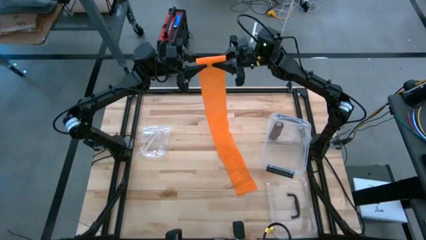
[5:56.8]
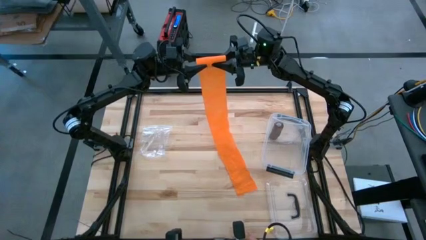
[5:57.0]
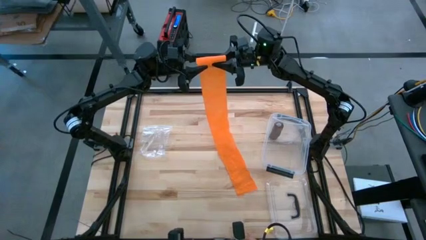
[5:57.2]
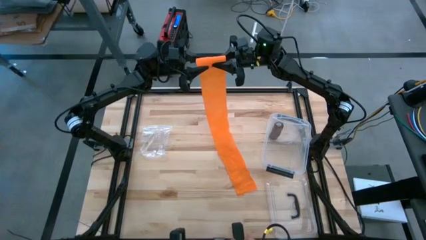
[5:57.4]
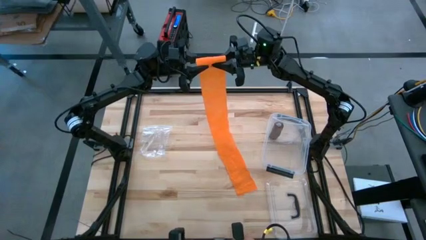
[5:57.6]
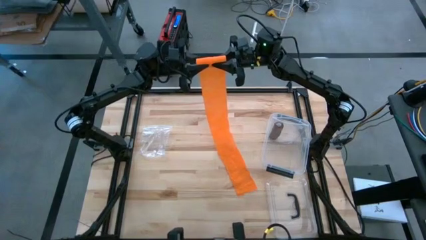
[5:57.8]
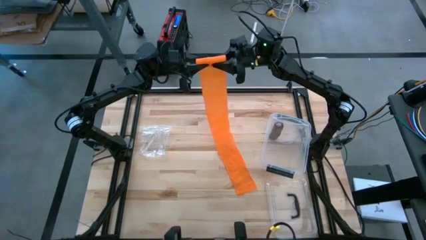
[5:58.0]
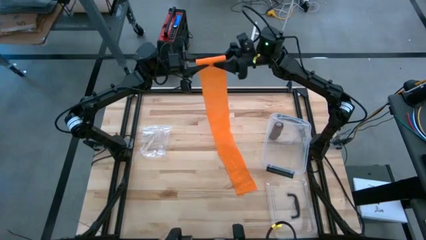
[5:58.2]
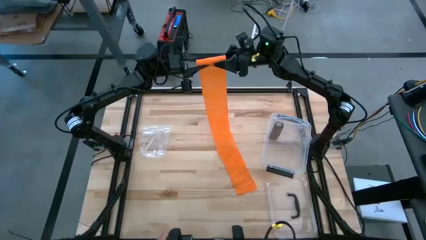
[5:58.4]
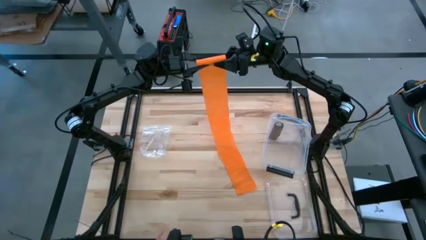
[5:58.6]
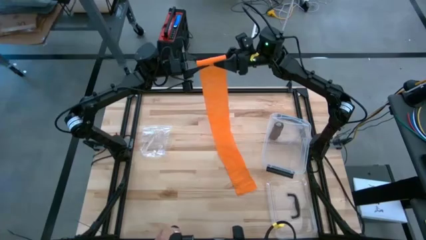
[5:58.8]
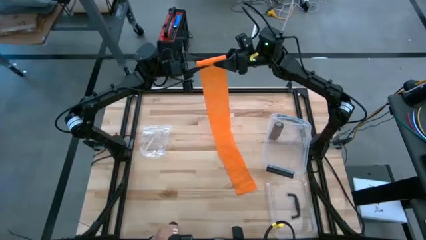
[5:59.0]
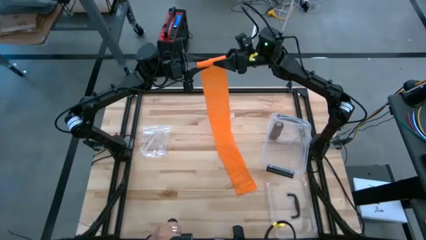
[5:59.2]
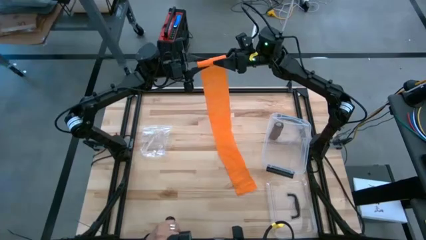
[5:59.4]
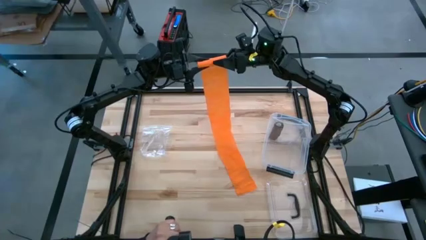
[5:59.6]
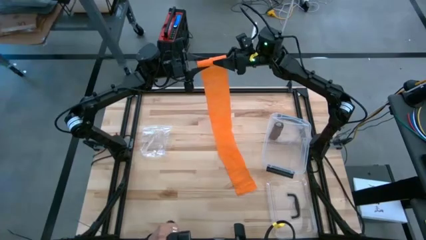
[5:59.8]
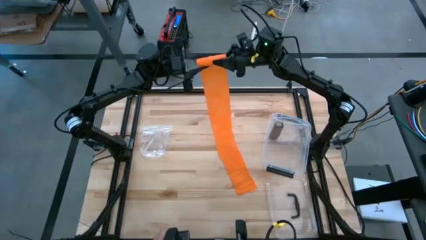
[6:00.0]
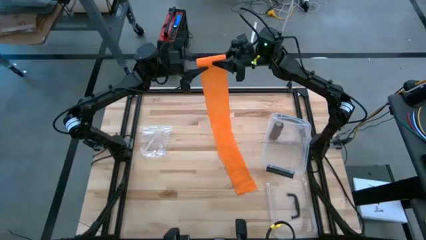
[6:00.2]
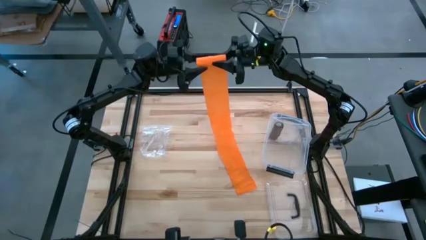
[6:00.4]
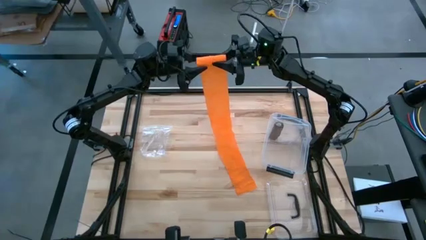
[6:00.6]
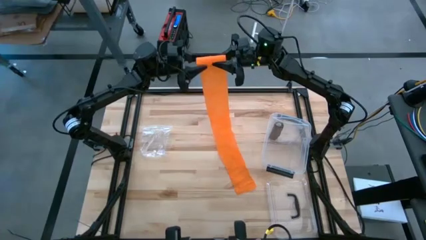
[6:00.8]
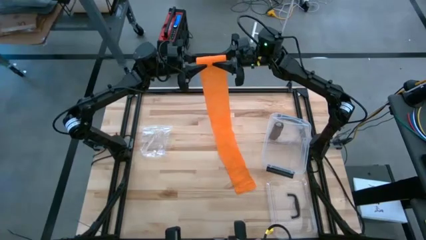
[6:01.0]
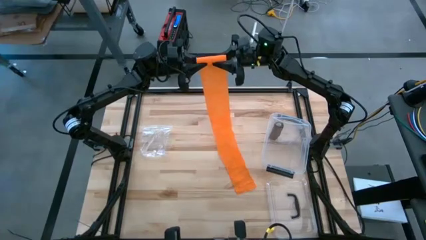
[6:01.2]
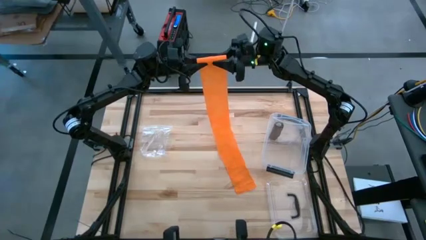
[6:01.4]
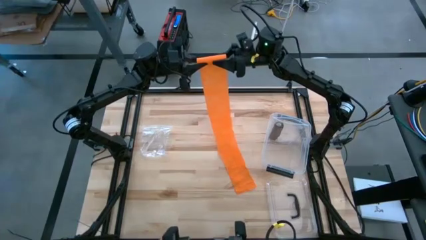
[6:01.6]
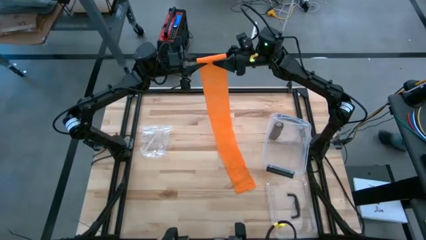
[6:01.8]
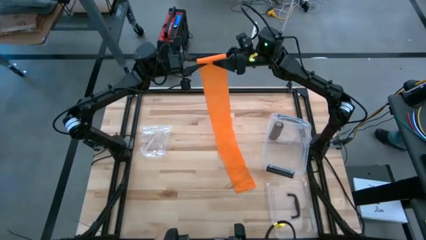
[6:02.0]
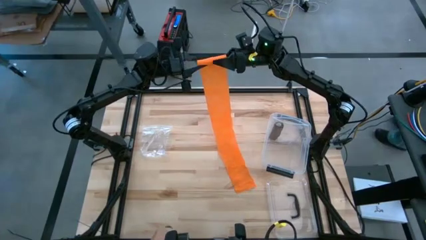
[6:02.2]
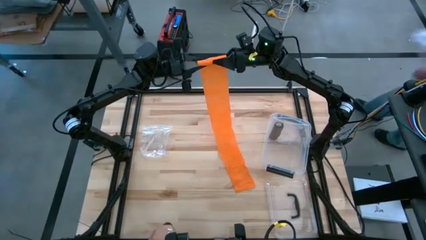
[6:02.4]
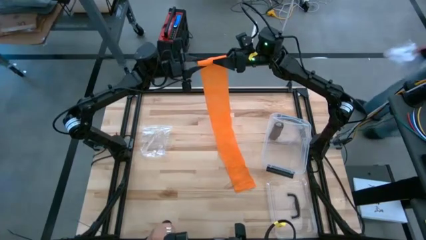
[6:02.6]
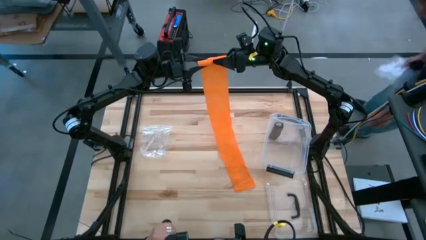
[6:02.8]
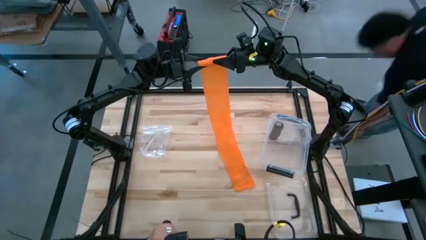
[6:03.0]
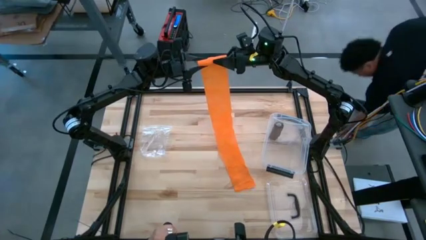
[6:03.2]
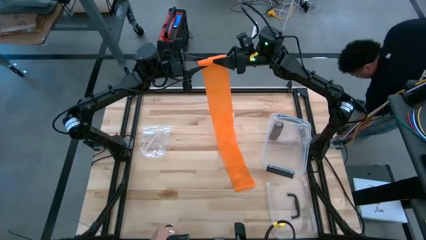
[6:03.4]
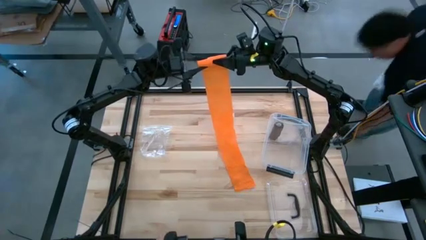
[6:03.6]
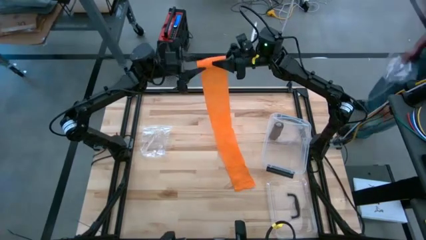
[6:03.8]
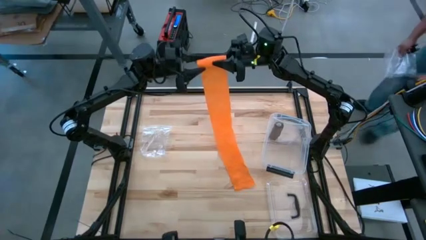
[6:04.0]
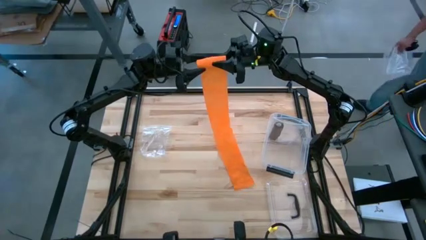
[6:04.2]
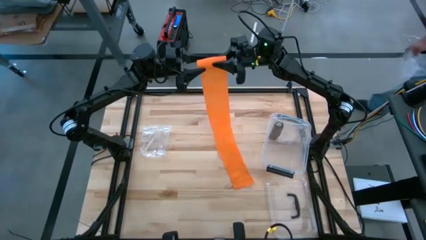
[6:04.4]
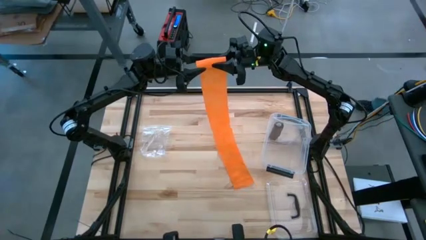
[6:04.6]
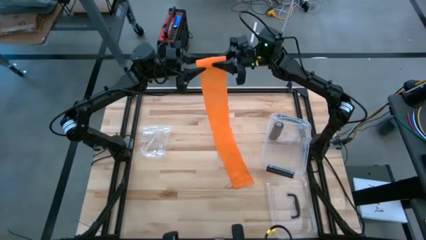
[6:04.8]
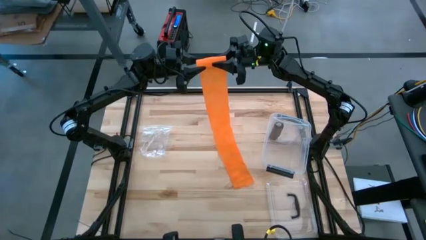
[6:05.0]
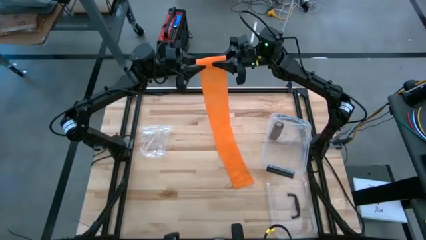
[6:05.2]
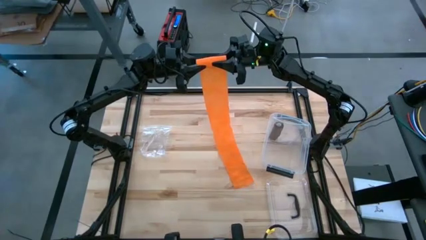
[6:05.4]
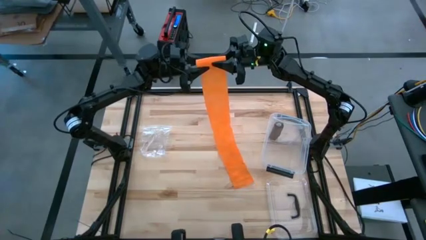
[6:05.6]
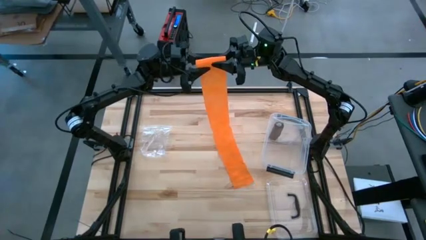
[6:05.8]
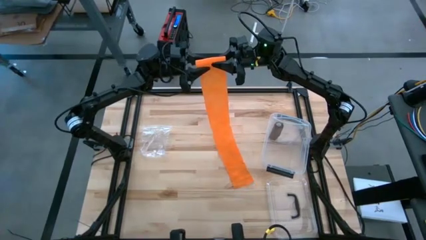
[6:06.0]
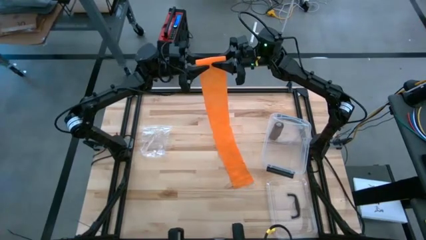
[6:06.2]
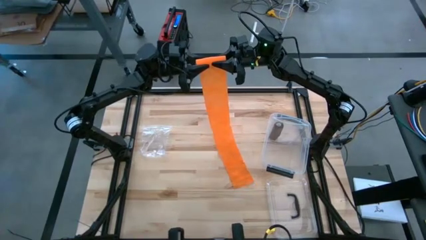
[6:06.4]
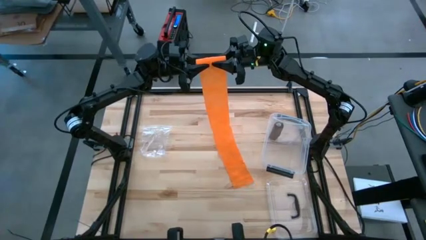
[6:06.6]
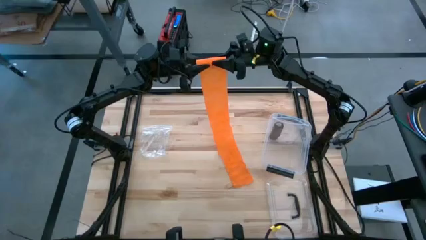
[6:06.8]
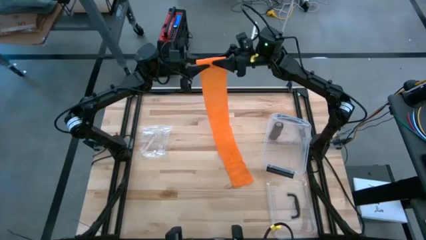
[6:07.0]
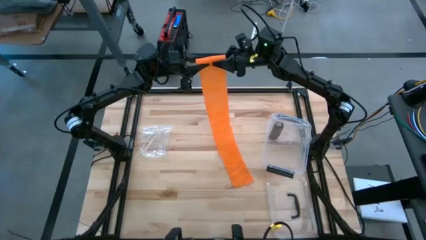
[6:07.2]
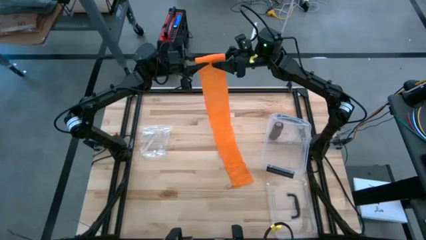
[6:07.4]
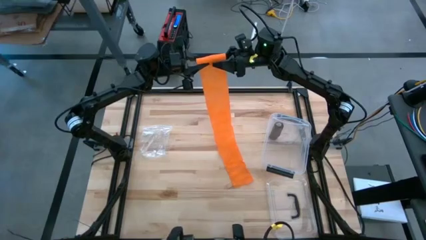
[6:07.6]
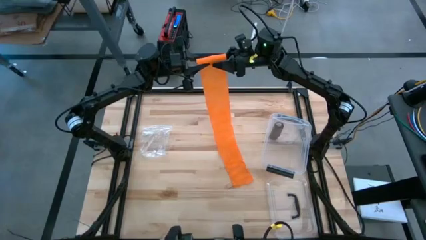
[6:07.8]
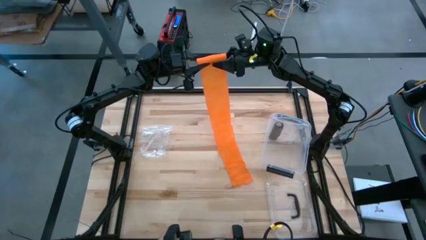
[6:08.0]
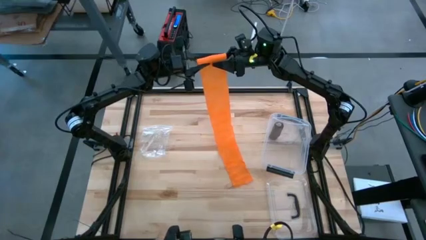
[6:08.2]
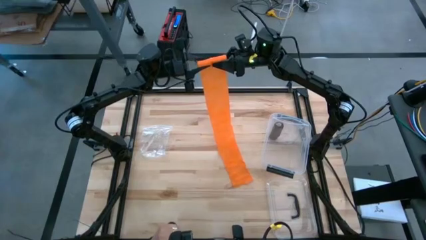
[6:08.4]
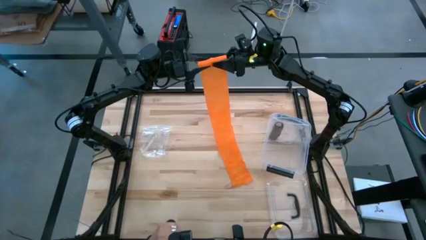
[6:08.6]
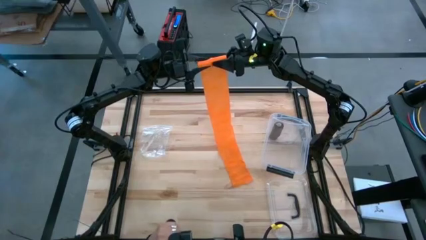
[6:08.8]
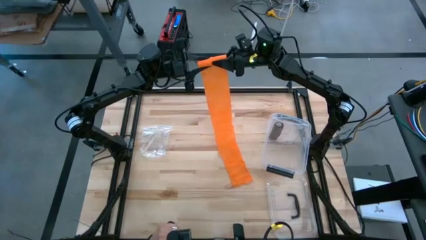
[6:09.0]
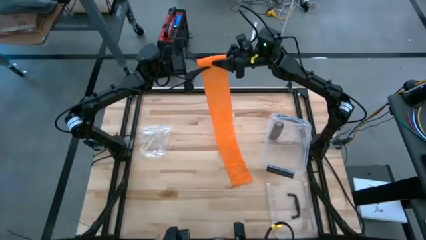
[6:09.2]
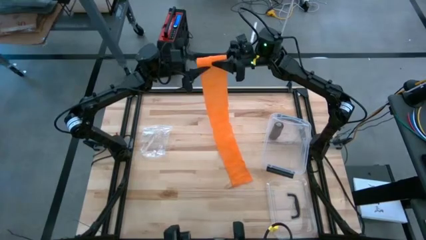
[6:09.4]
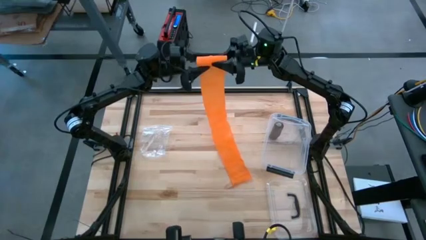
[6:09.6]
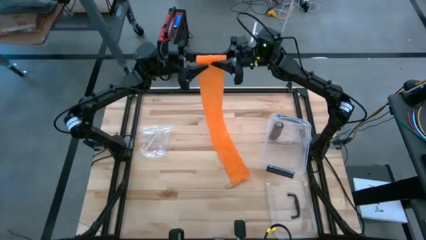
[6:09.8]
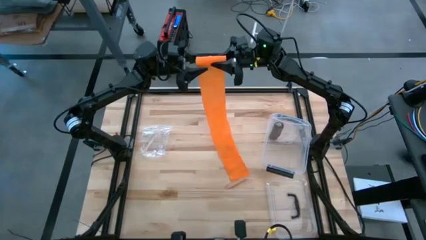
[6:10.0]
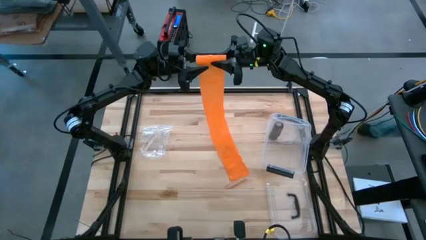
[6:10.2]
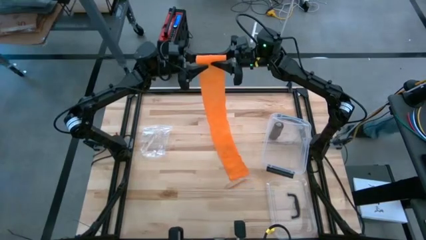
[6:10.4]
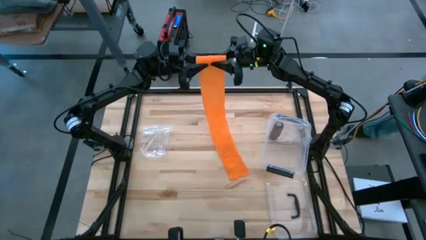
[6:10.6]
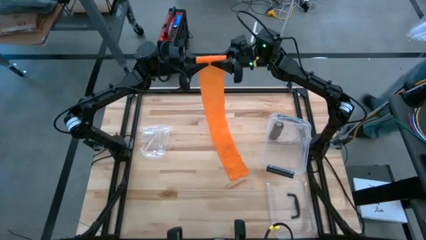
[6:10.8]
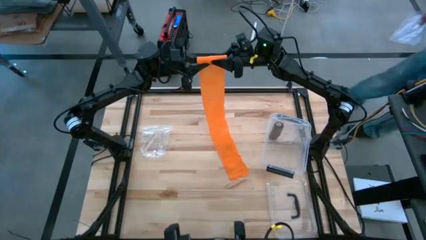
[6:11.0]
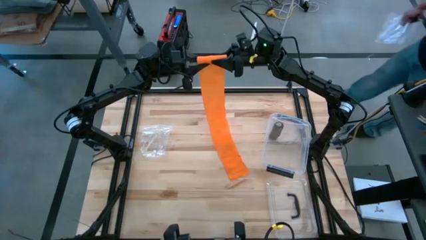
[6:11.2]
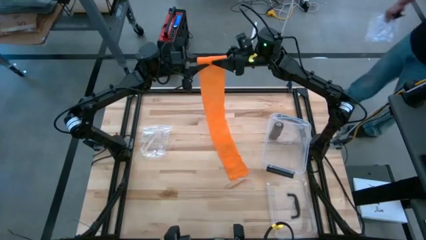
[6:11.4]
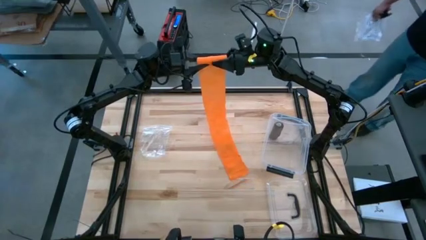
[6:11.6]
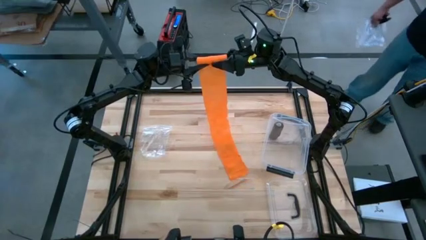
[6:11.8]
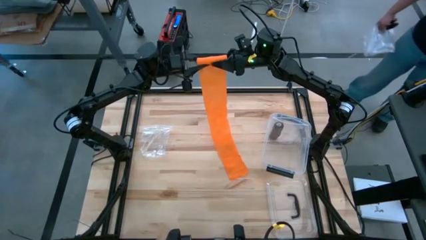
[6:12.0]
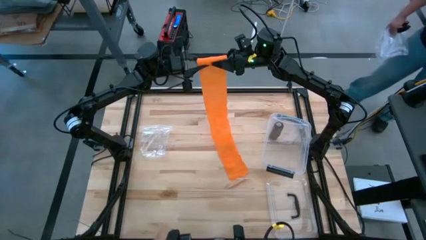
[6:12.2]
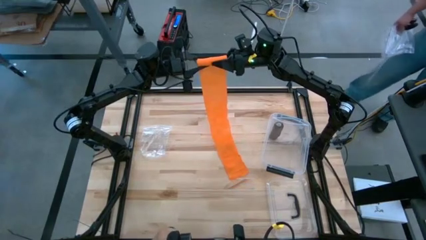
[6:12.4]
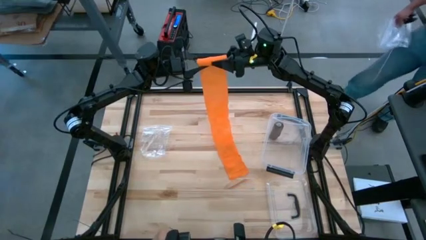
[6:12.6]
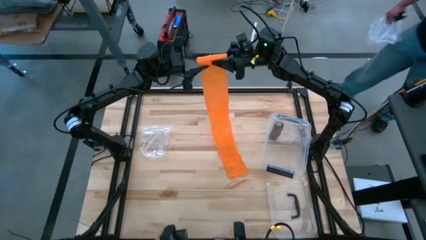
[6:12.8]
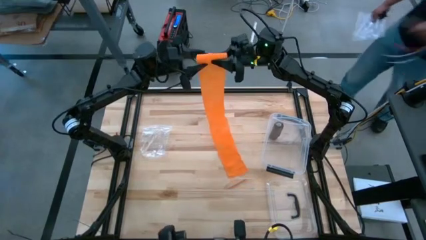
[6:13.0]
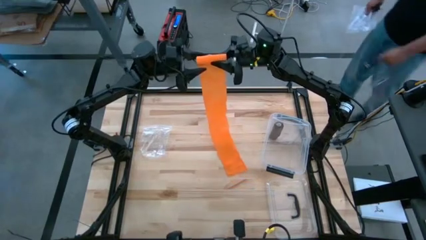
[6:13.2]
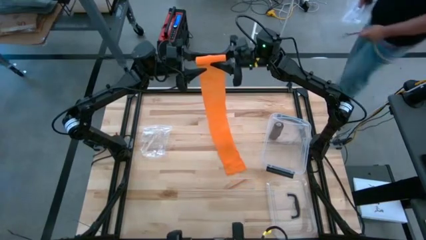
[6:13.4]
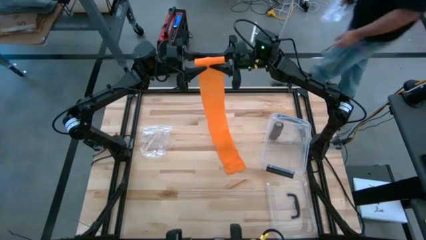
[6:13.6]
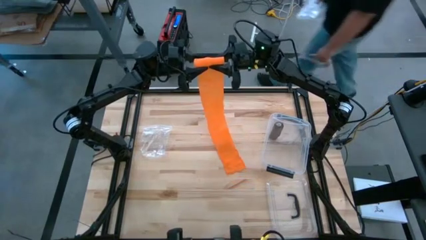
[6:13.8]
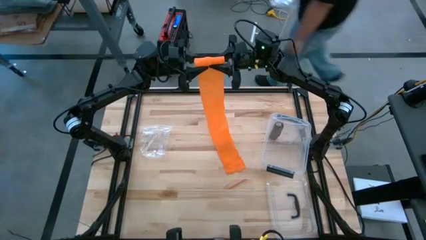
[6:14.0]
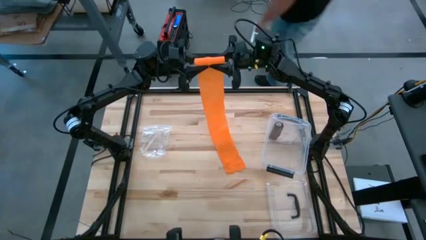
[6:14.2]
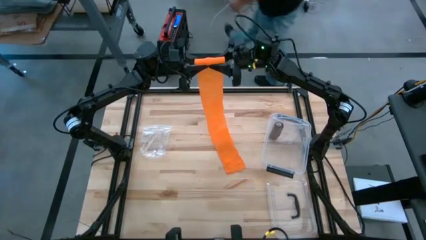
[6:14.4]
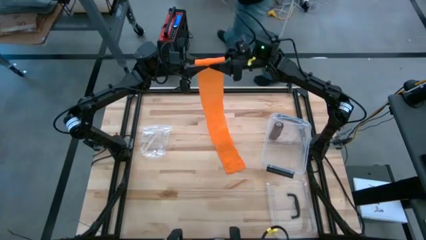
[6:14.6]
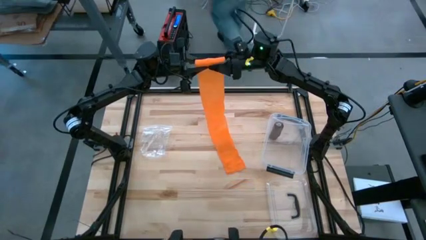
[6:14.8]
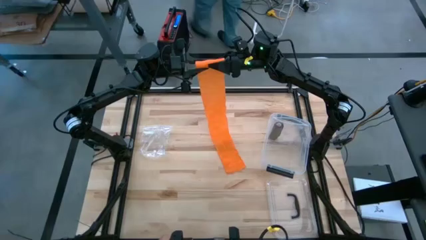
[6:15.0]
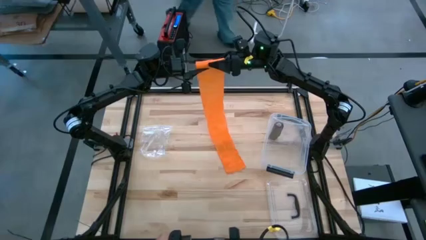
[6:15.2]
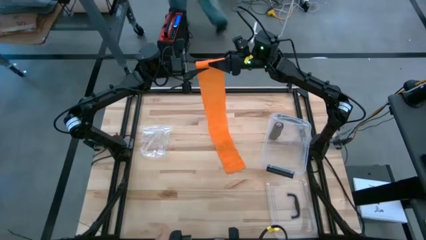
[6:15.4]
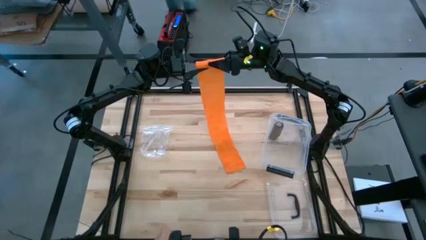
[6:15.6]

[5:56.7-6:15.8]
Task: Roll bandage
Roll the orange bandage
